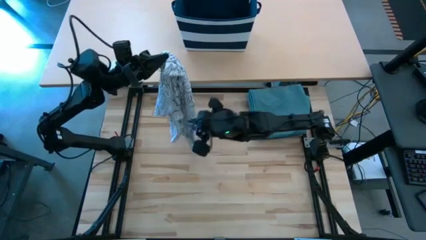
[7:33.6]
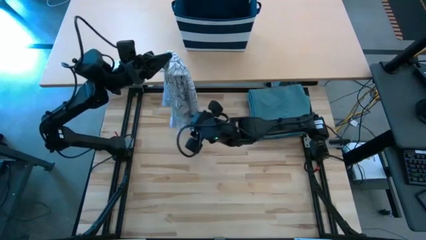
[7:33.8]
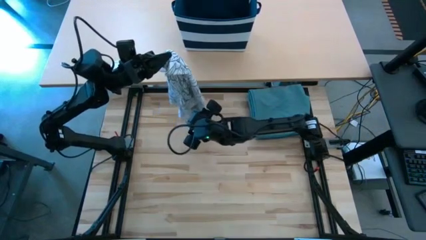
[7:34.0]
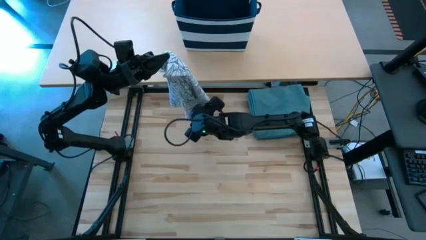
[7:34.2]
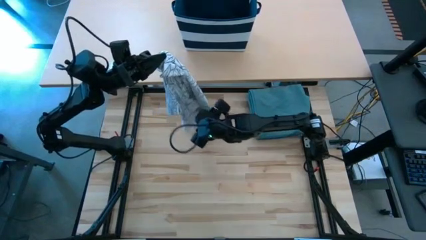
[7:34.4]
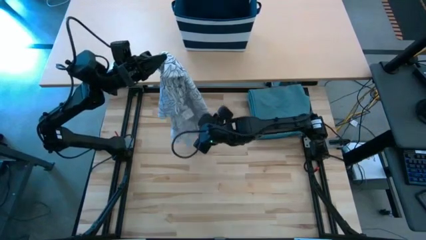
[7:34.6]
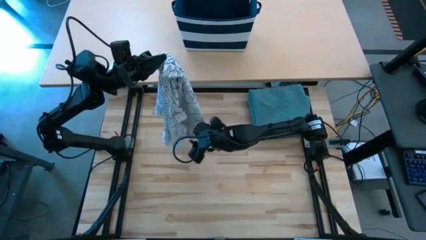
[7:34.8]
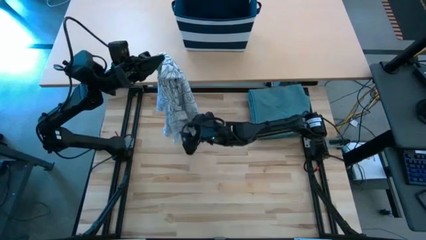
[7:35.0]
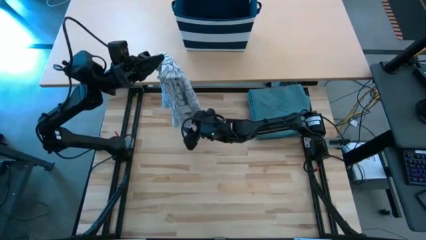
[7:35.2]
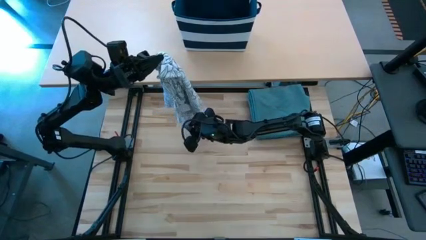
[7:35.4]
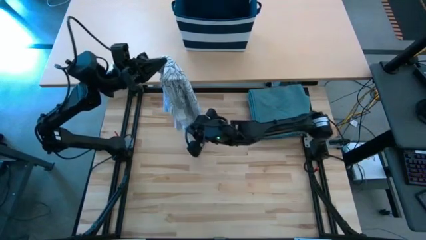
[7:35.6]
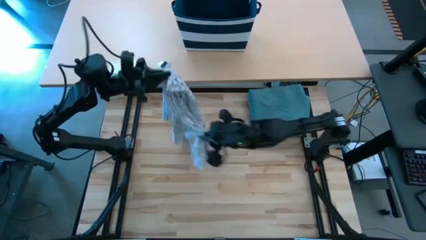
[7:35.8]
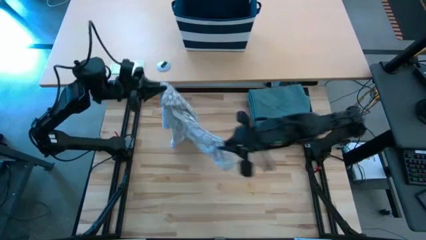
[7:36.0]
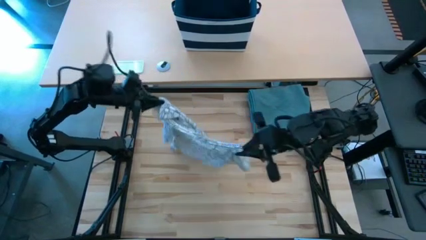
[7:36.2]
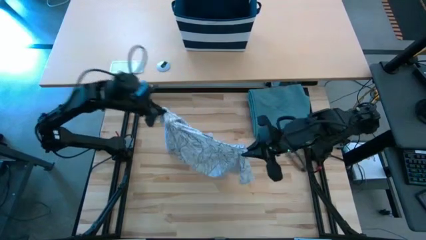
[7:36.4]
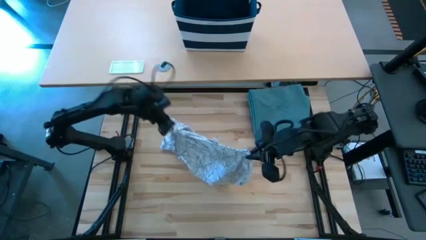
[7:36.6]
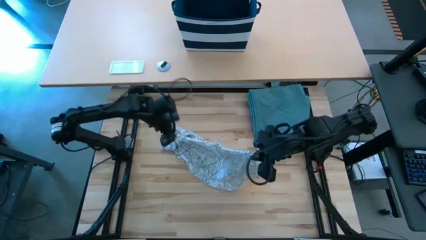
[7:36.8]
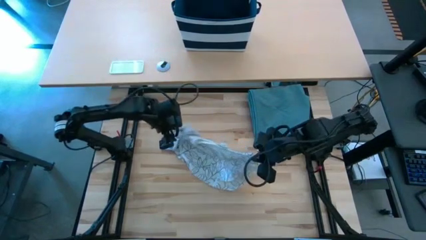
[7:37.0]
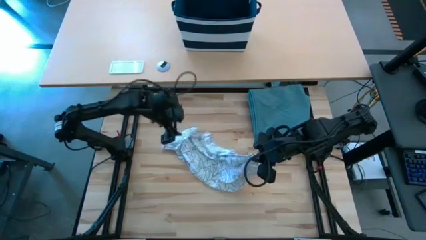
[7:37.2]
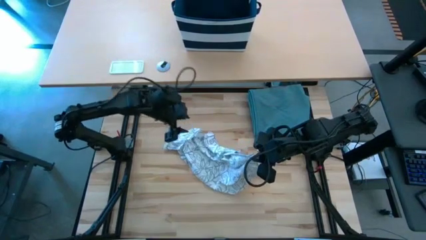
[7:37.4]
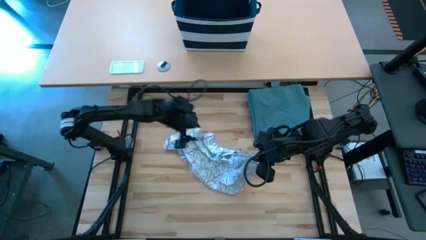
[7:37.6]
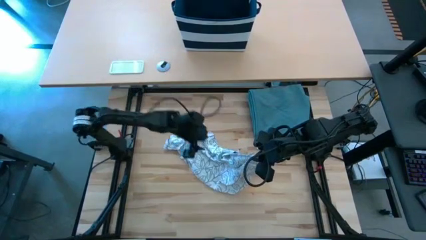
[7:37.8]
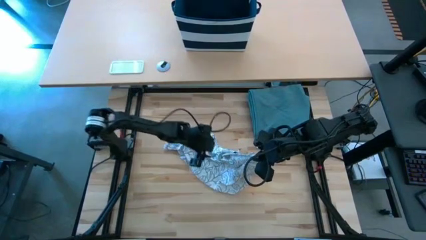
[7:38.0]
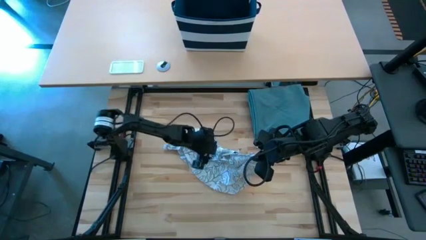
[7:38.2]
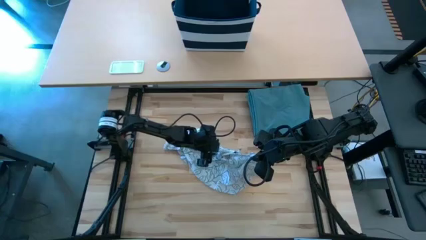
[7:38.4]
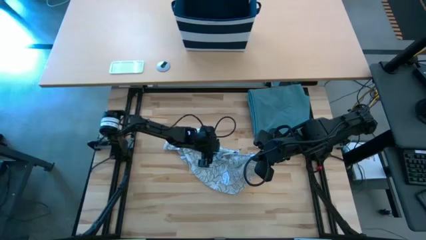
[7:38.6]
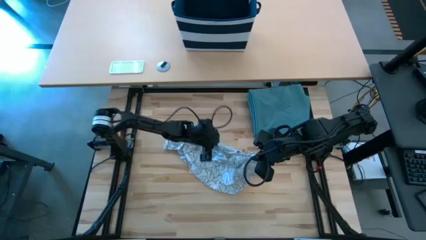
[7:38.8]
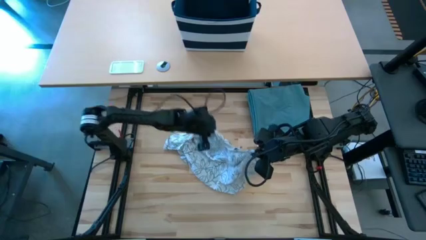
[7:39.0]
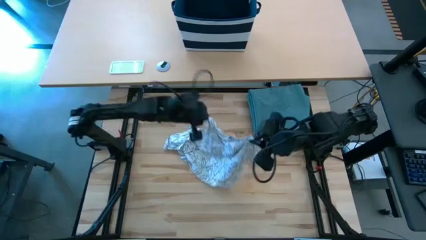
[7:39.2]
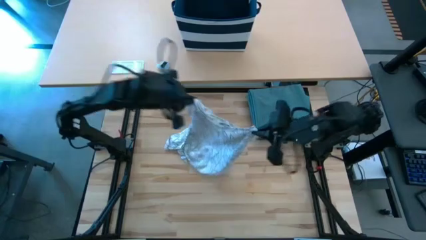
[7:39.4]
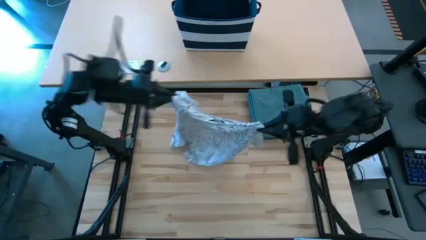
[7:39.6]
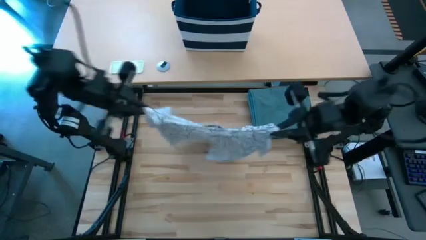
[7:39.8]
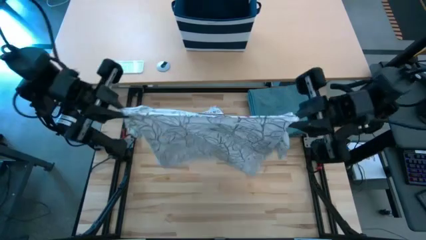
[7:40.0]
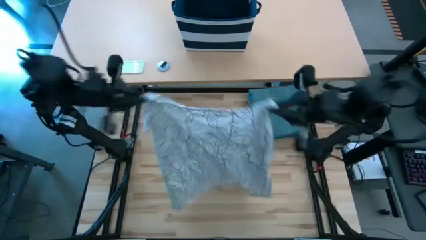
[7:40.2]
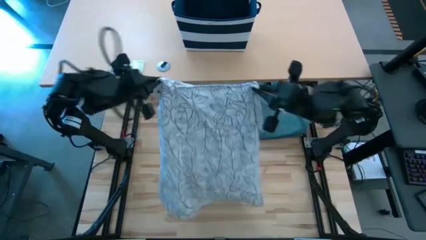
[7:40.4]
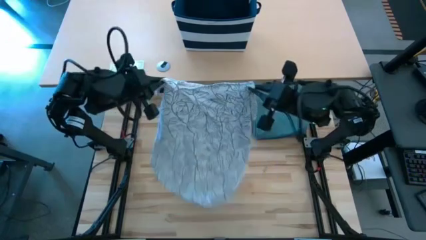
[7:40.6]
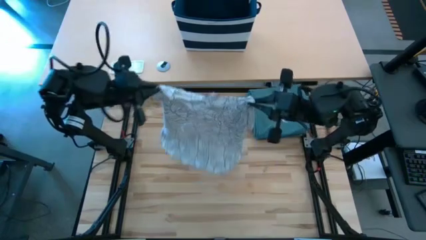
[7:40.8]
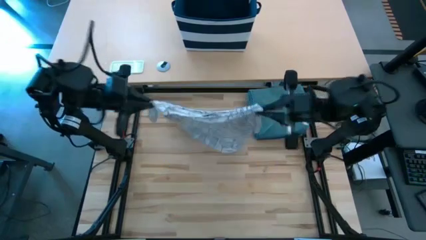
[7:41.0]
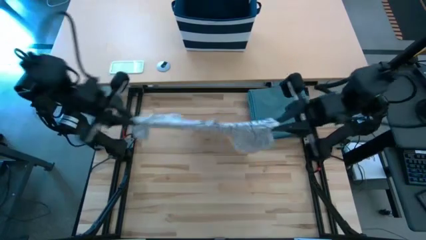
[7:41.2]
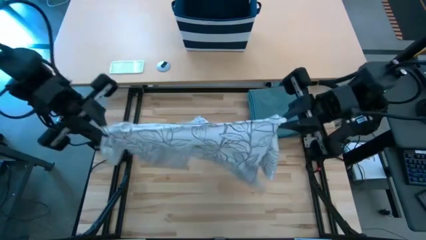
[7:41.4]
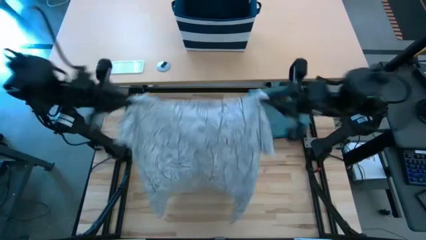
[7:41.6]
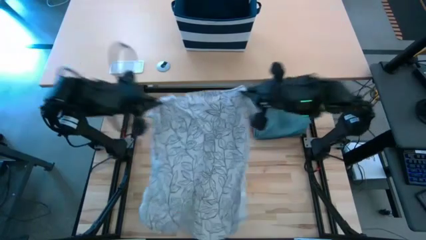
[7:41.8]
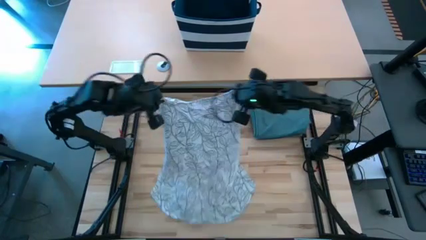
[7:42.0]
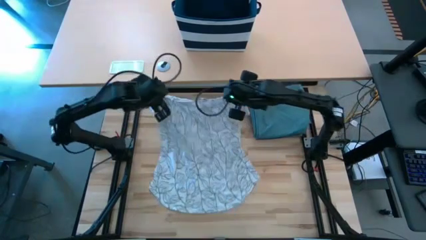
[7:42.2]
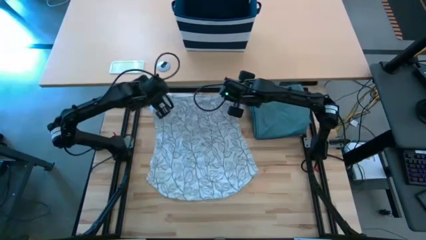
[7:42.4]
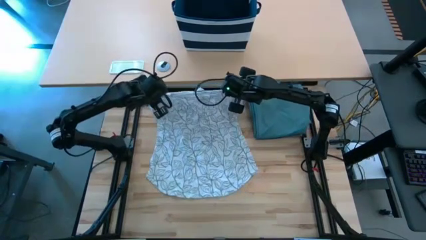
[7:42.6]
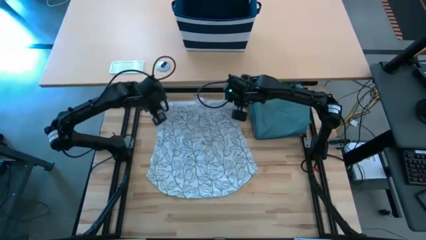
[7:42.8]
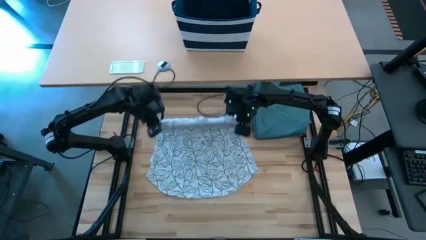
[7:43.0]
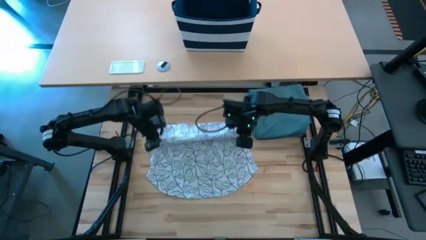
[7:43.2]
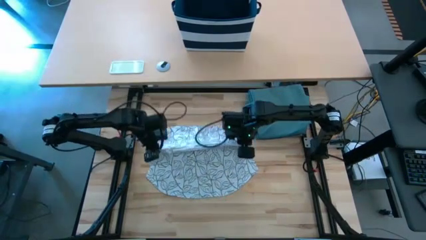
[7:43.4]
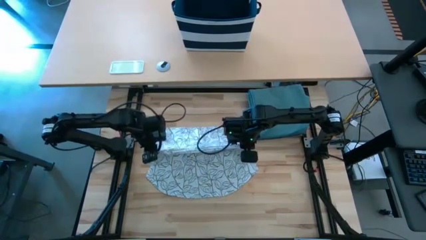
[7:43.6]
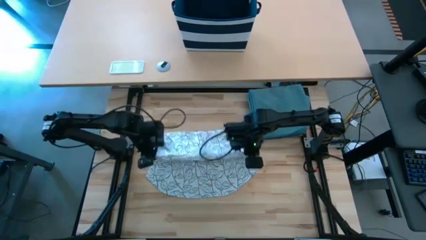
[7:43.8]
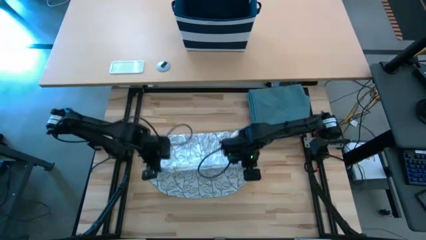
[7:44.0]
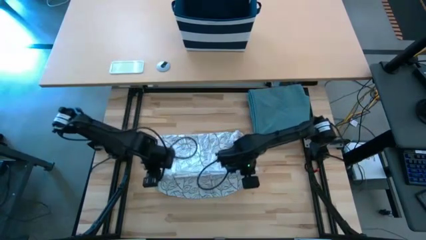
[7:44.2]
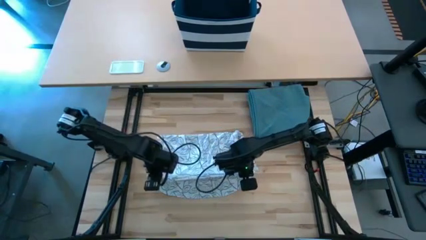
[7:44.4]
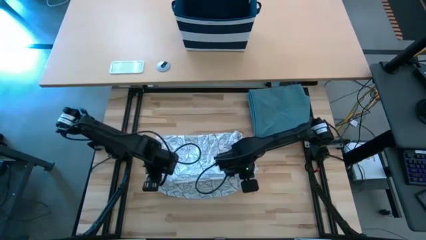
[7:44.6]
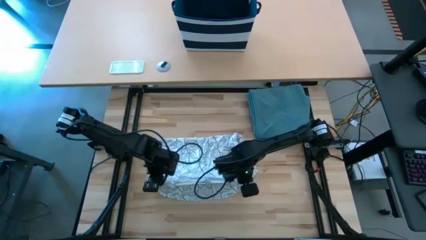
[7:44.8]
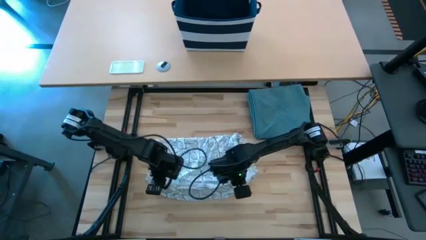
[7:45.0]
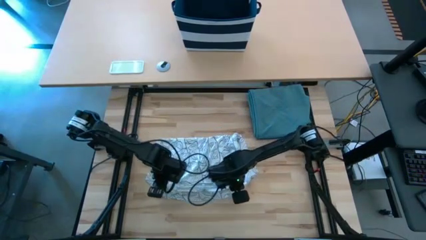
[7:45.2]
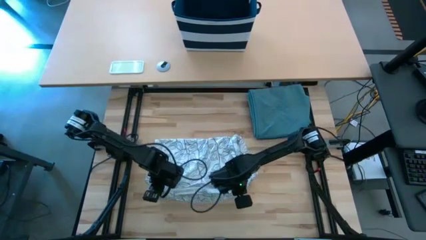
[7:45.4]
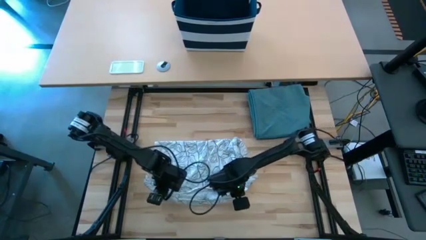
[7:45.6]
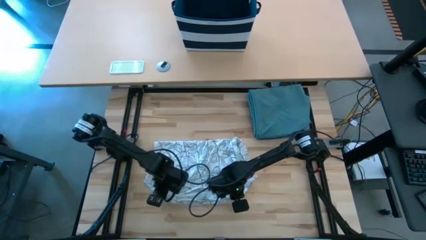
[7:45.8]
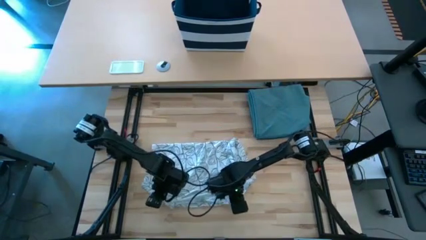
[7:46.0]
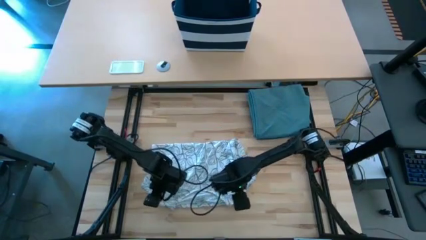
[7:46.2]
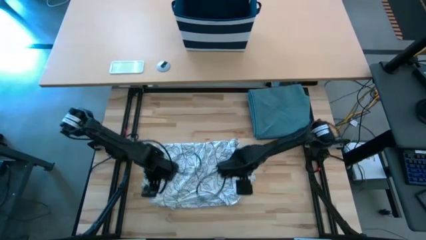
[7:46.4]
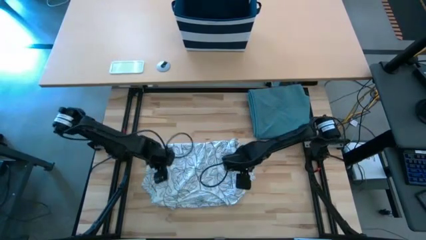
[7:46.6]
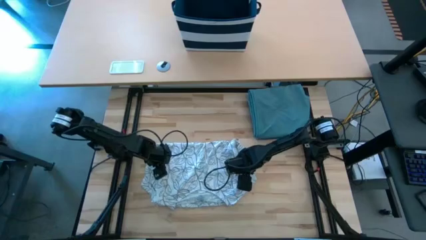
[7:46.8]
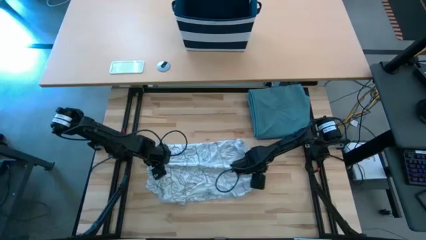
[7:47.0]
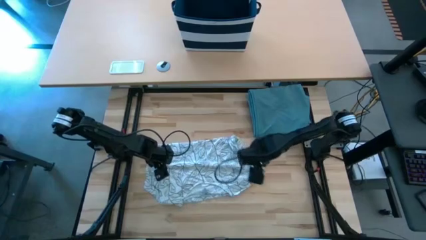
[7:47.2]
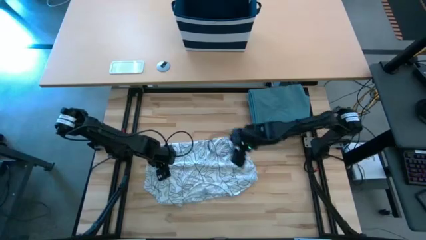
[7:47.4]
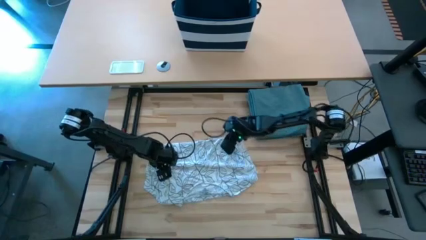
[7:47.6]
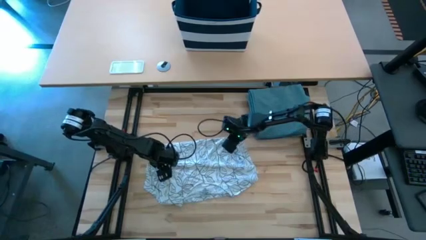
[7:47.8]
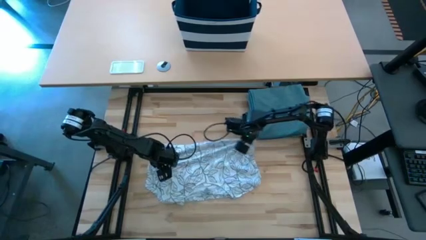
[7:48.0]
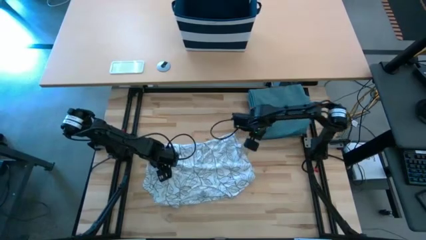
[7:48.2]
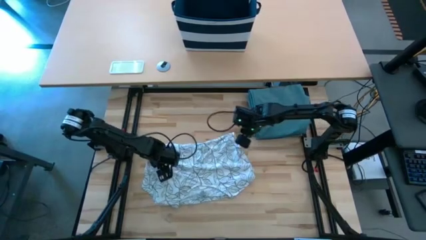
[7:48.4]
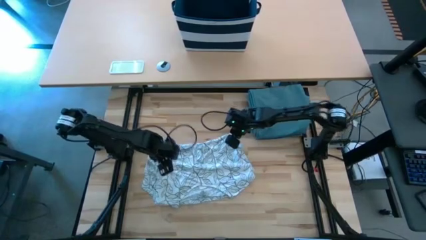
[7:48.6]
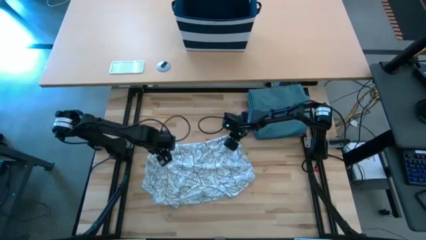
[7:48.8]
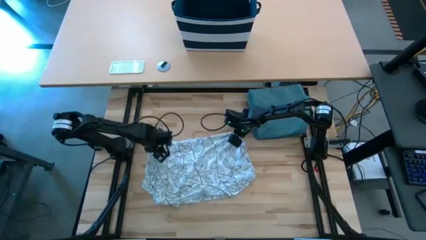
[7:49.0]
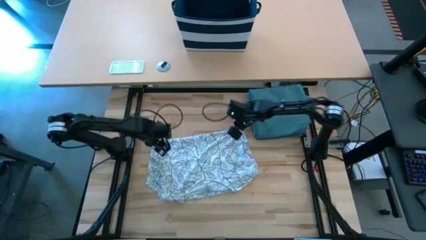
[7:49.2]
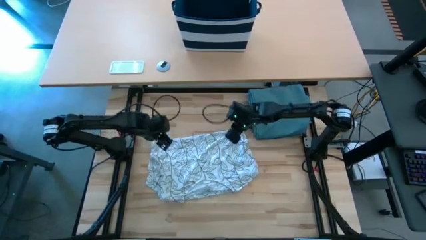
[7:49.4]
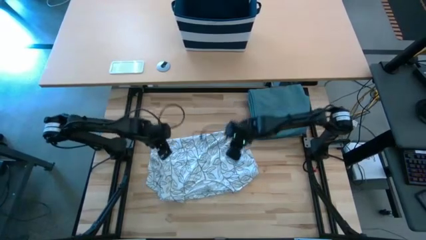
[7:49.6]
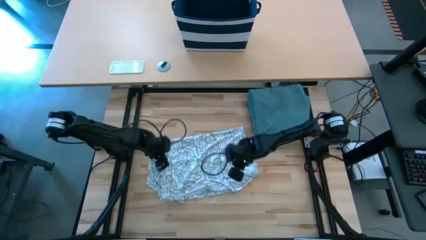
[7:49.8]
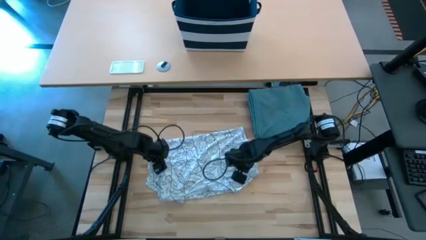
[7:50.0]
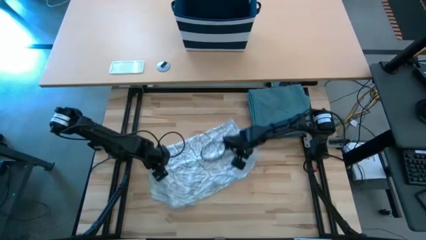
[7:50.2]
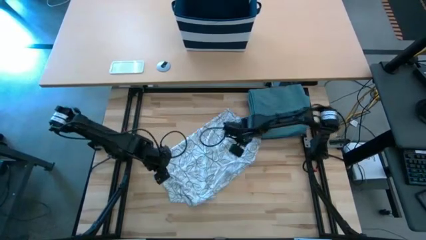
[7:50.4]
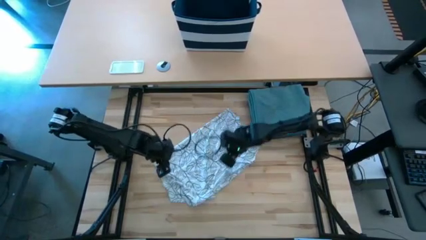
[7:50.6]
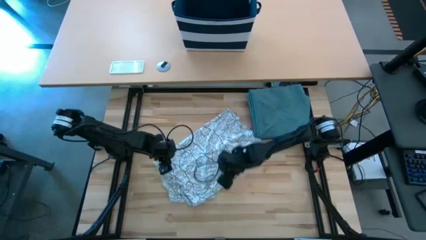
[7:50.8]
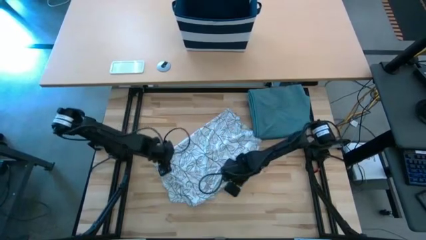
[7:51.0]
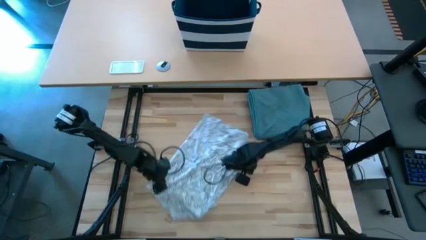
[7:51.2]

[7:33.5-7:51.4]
Task: Fold Laundry from Bin
Fold the white shirt
